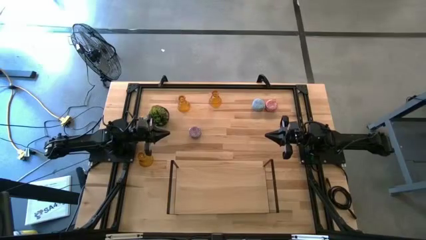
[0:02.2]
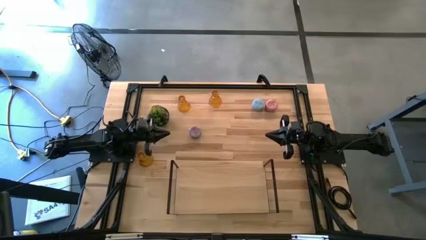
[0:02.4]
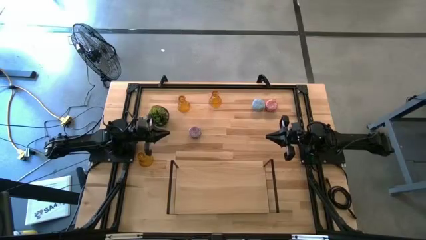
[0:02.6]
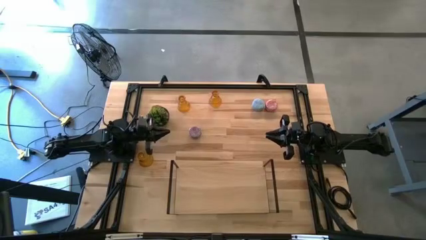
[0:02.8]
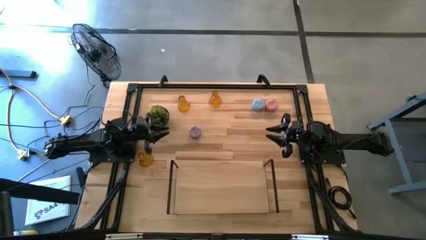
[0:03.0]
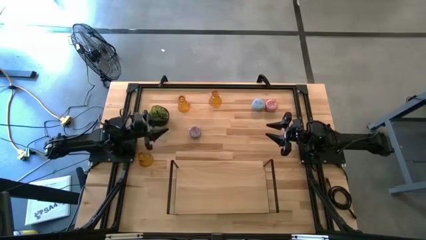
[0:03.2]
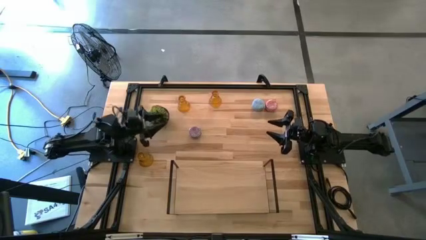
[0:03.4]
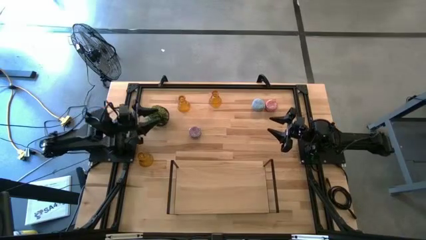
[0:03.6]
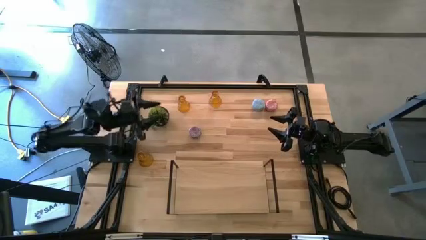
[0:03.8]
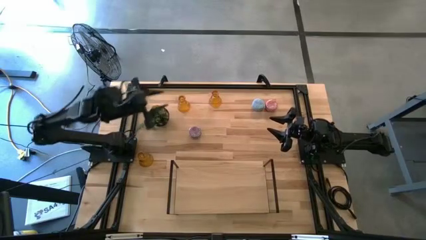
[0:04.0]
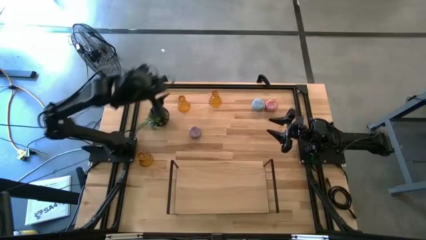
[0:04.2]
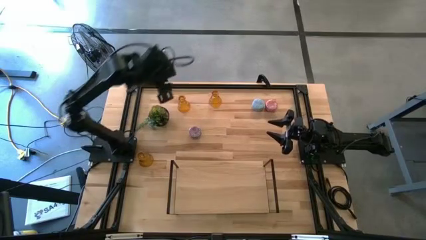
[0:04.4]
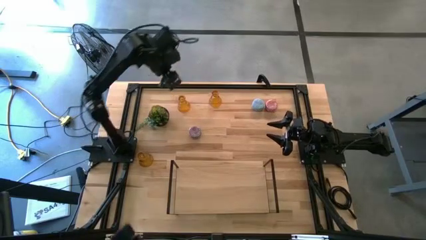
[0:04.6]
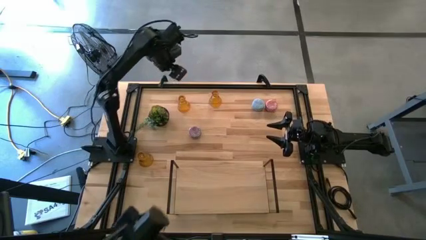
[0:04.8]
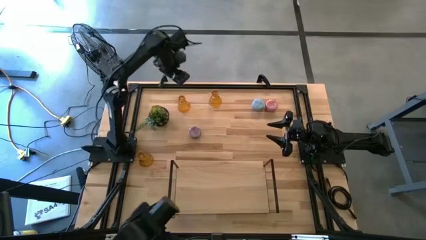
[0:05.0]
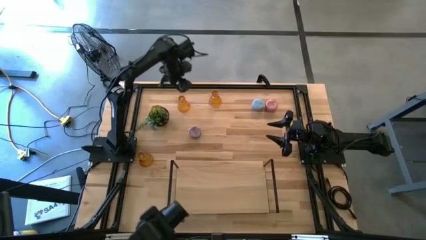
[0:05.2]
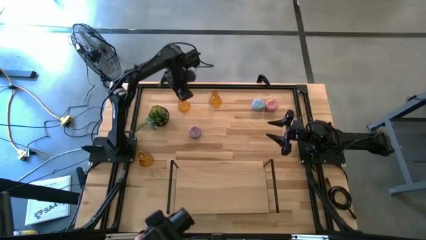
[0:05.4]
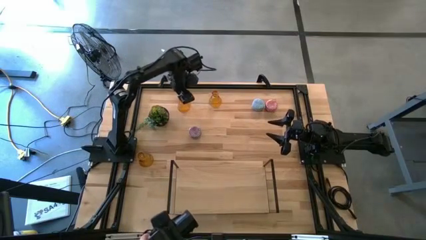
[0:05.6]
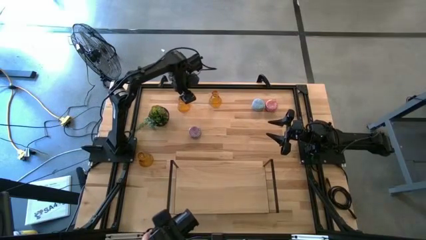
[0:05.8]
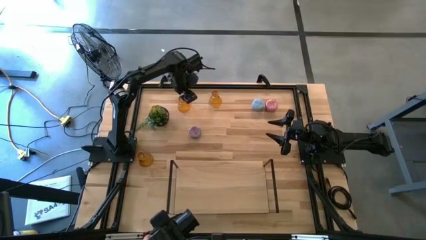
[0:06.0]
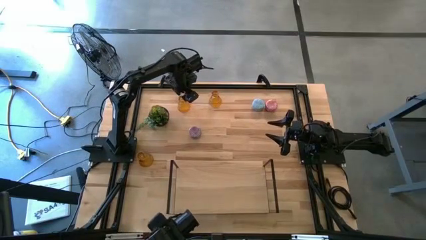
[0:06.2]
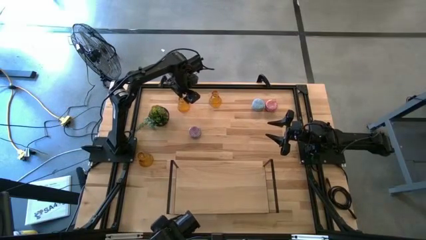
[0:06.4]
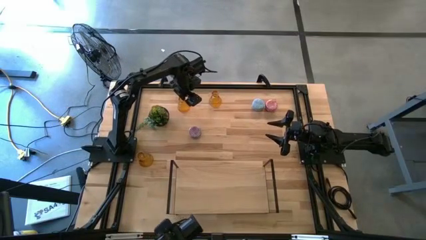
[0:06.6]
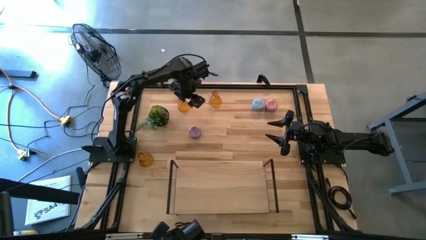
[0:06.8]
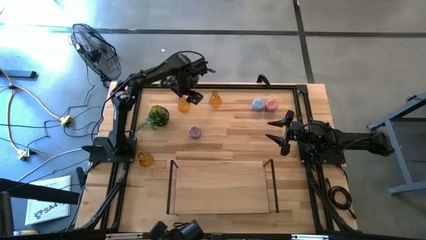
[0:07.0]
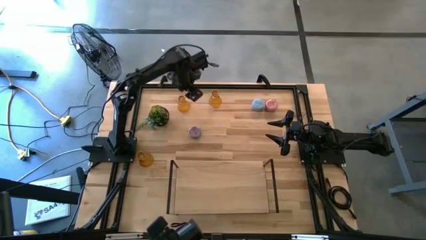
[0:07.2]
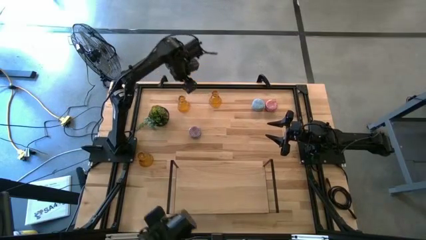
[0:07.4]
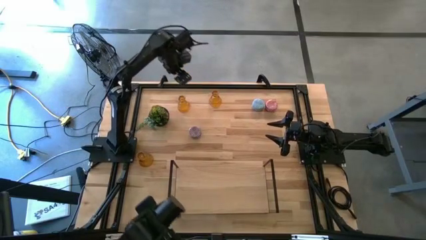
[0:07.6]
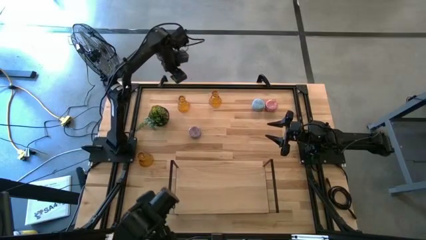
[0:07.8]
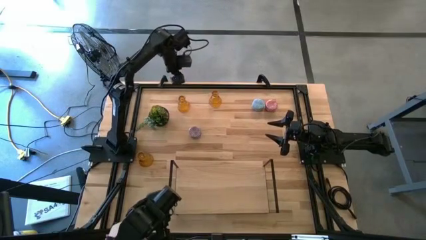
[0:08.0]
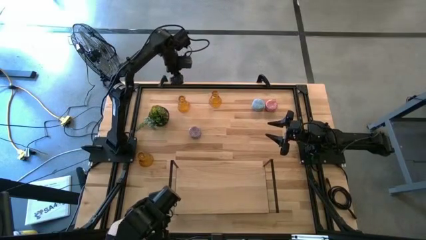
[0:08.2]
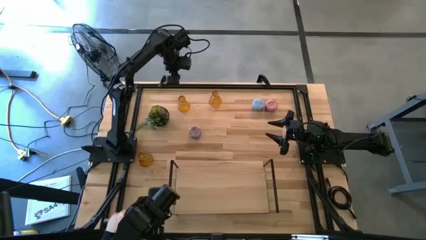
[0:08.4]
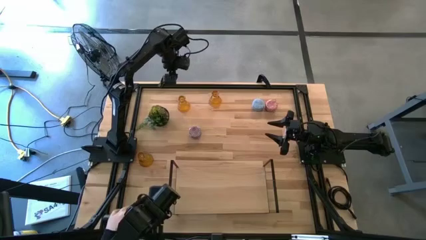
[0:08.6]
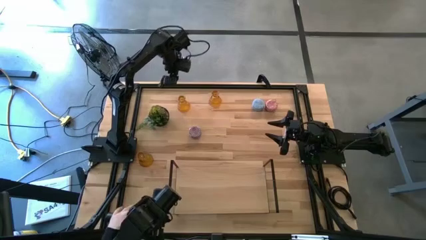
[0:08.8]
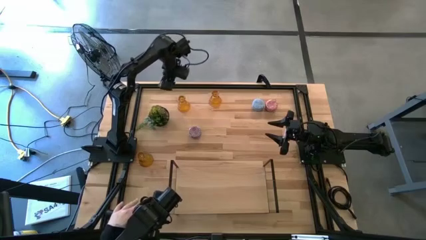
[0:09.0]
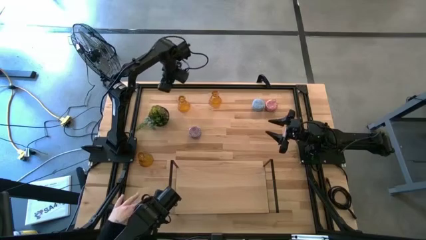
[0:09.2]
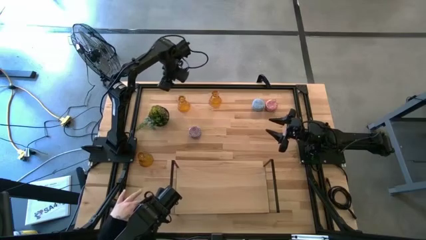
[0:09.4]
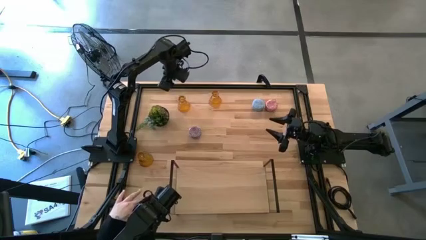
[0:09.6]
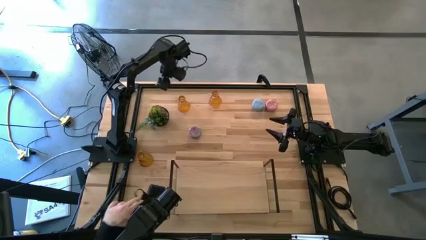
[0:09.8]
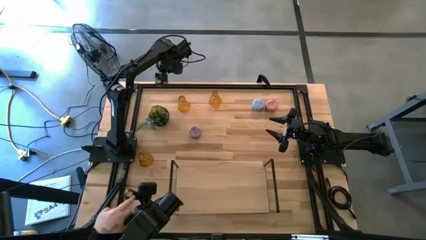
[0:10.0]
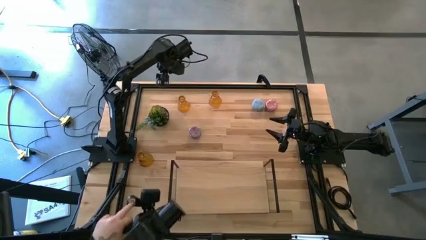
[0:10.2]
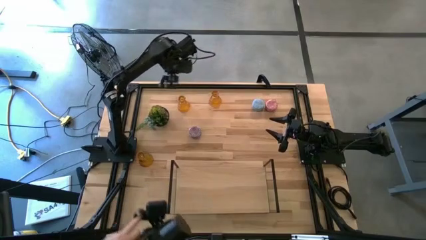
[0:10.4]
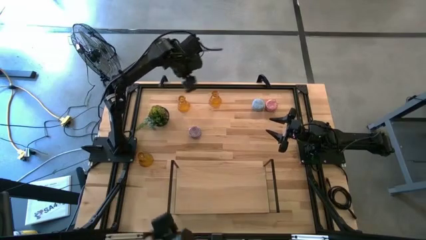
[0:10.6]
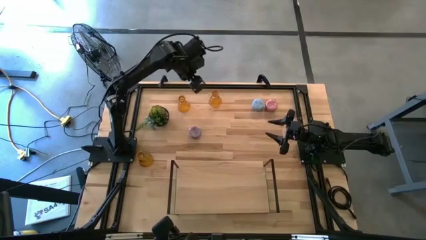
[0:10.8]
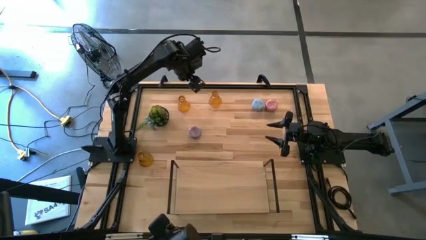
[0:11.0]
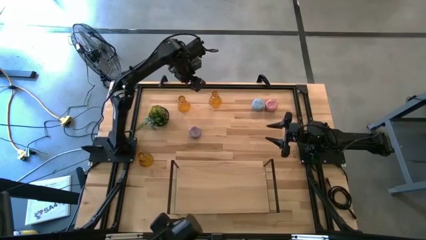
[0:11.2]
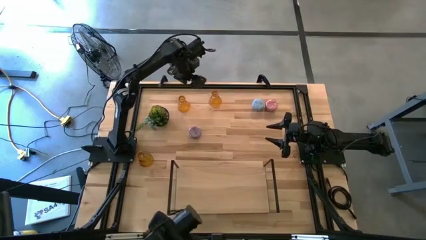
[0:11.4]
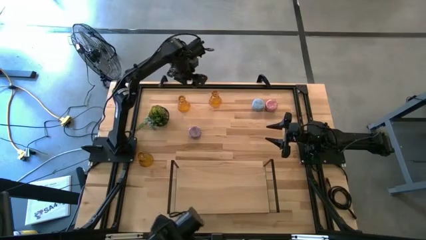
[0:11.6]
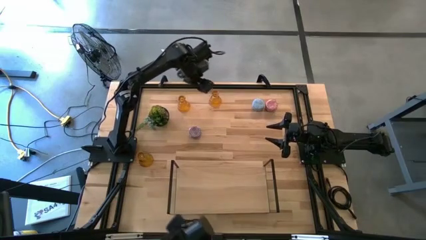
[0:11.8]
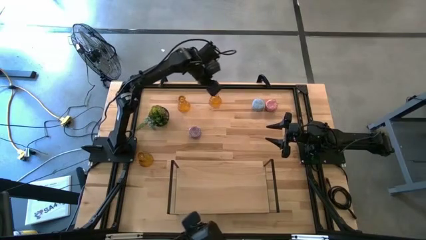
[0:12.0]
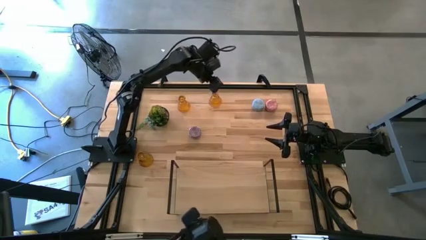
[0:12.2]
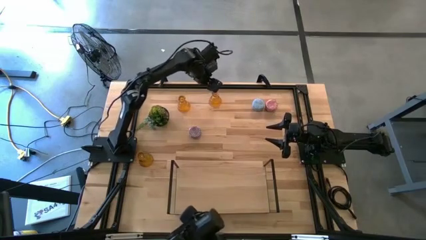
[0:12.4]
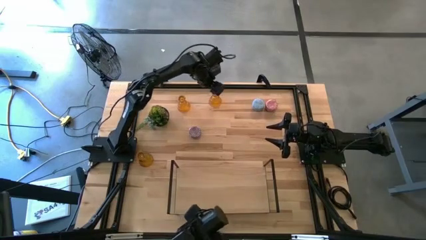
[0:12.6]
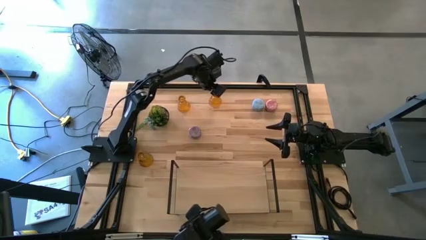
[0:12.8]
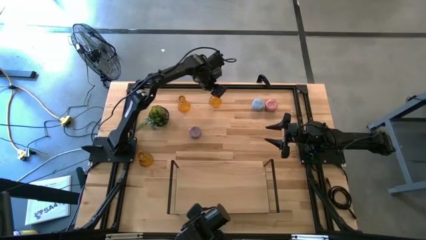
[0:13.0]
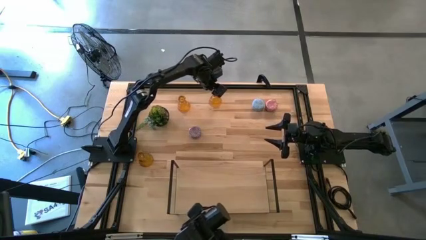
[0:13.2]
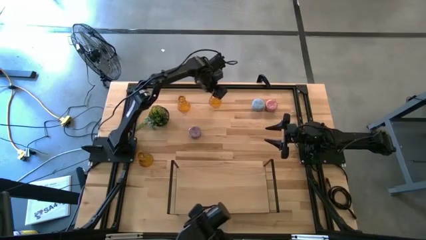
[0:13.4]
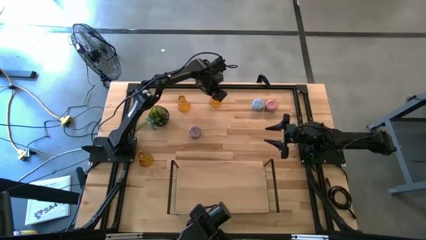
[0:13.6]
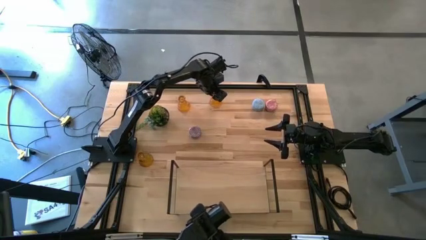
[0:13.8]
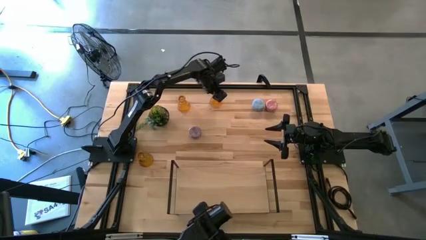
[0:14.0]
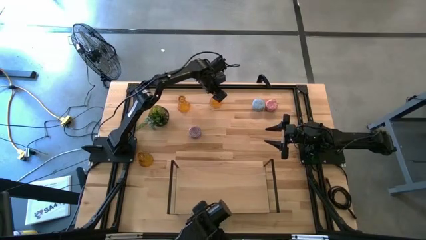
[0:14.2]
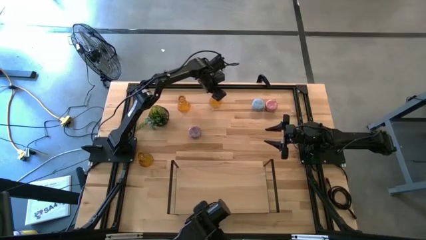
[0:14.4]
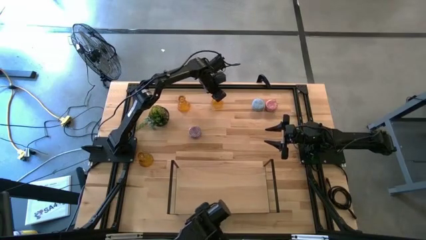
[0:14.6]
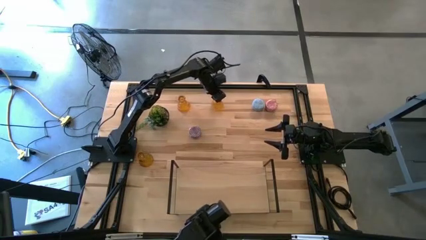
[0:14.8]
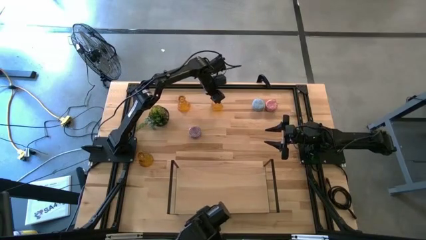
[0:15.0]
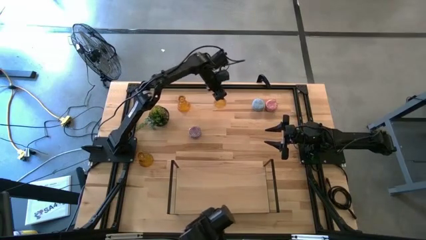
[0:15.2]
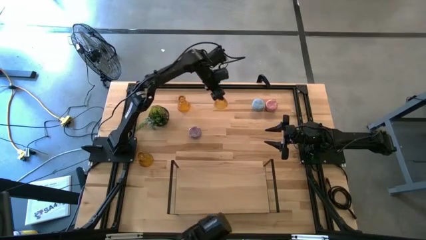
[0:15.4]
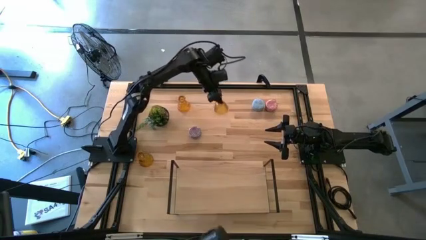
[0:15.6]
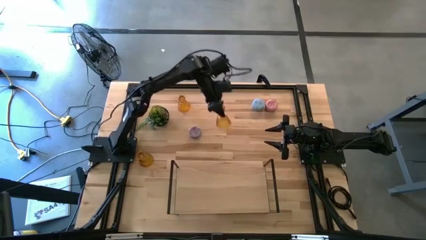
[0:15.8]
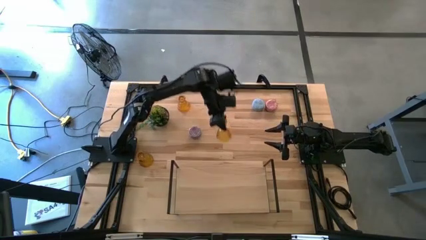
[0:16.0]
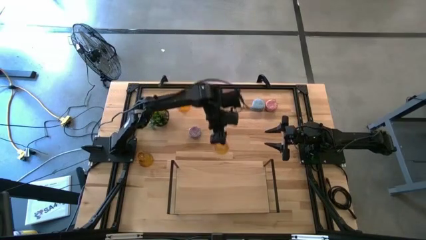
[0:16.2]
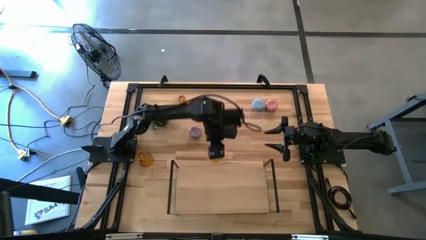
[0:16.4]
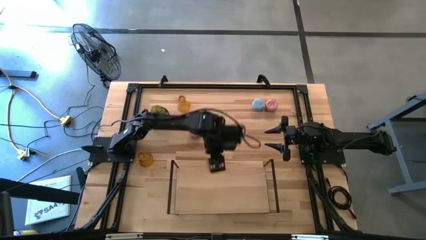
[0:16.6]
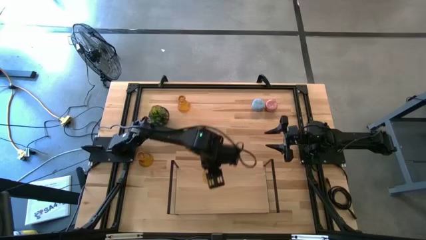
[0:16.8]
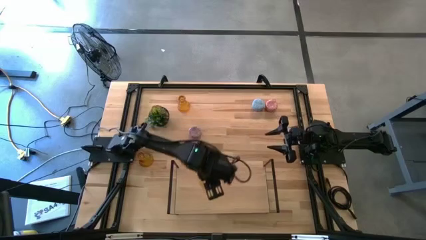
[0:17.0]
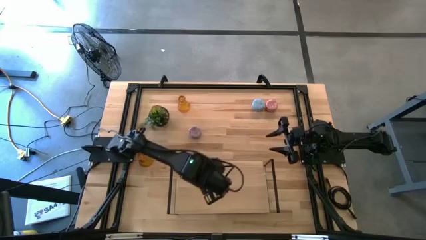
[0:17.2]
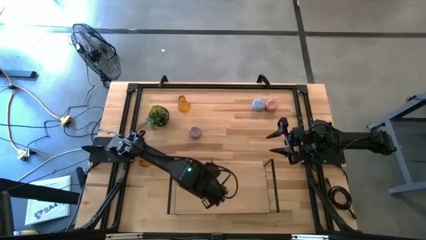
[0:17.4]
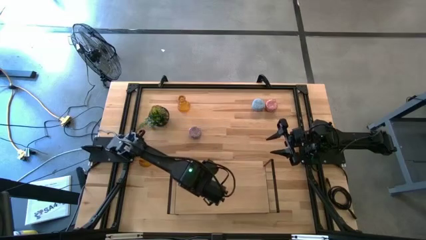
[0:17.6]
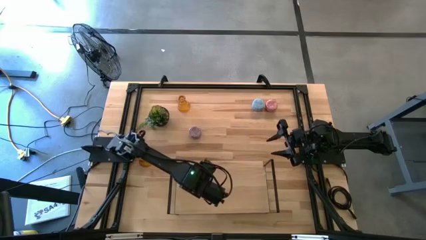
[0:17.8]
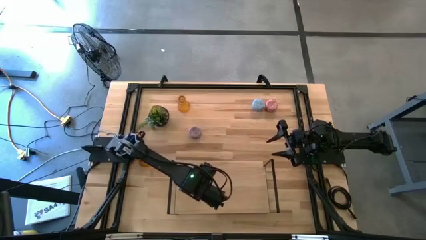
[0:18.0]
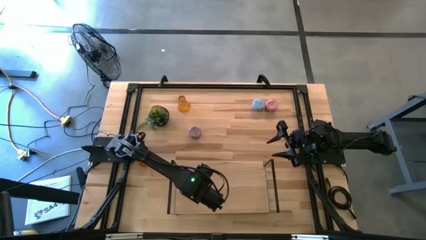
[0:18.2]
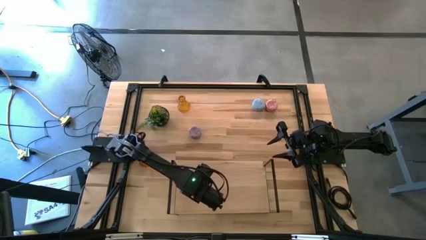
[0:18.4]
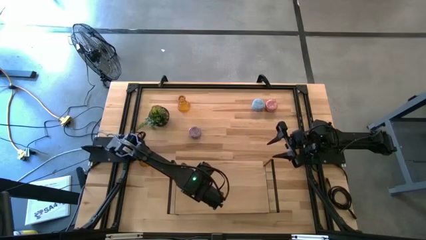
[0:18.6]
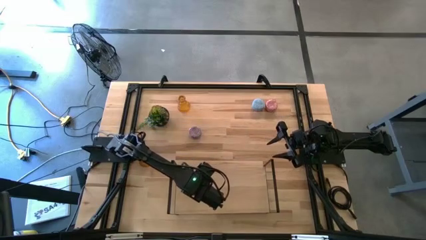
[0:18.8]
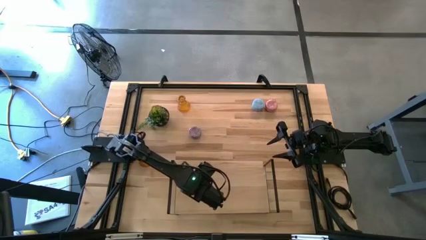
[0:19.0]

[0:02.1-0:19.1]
Task: Pick & Place candle stick holders
Put the top right gold glass candle holder on the shelf
